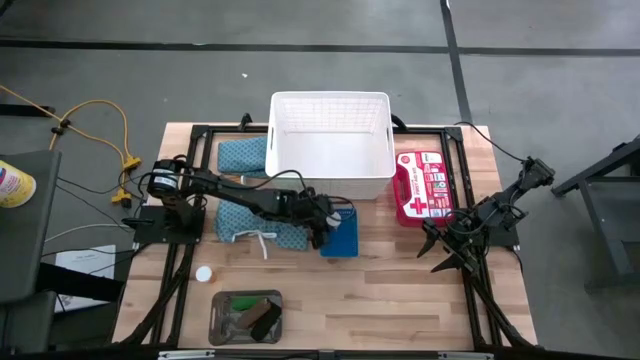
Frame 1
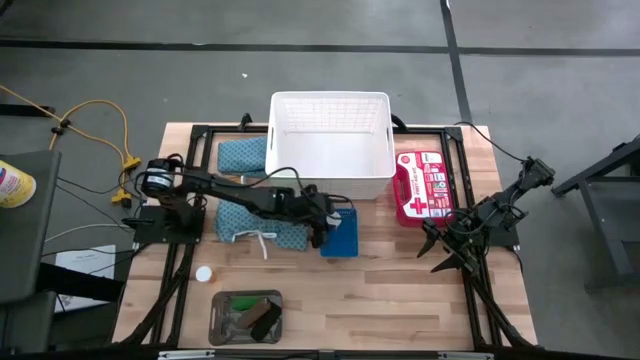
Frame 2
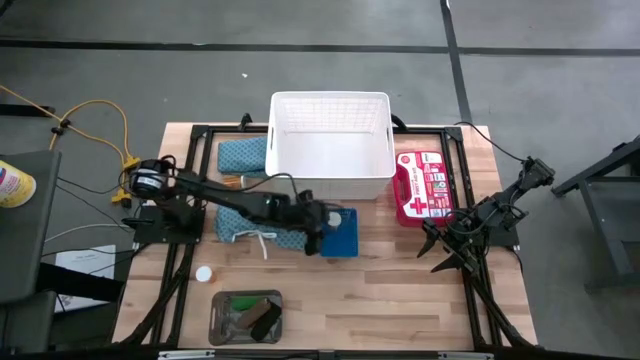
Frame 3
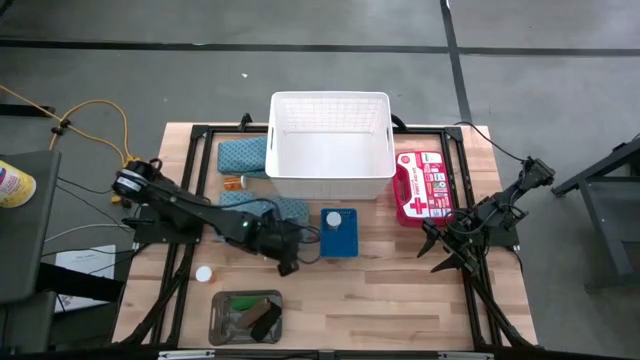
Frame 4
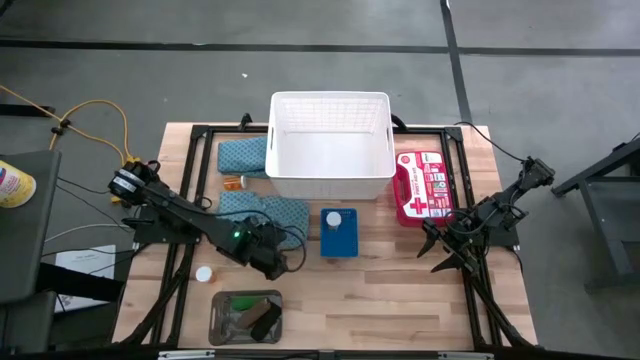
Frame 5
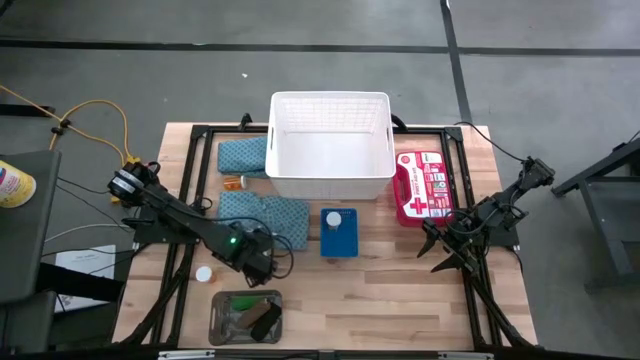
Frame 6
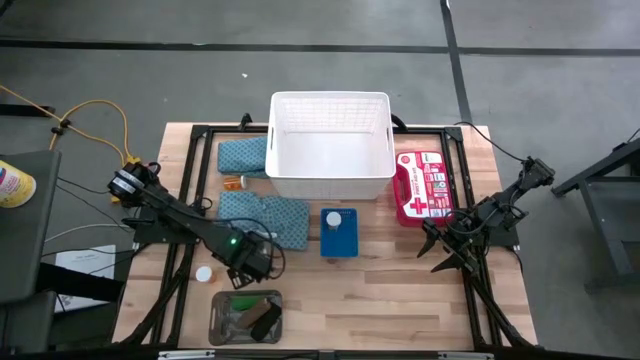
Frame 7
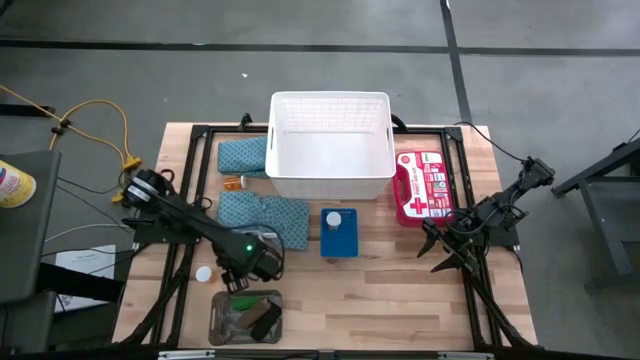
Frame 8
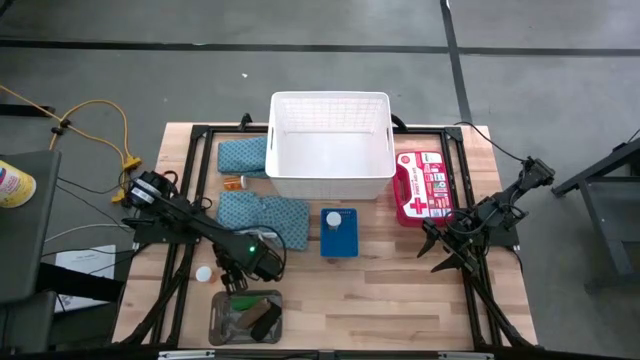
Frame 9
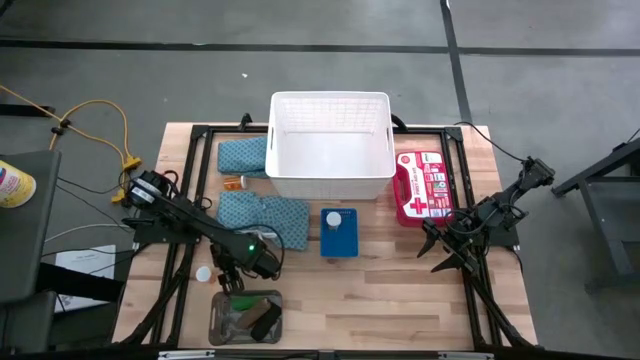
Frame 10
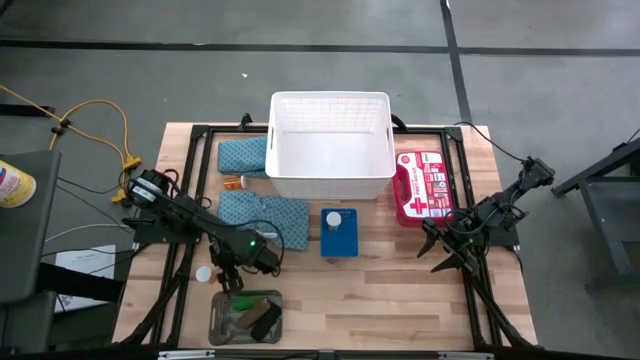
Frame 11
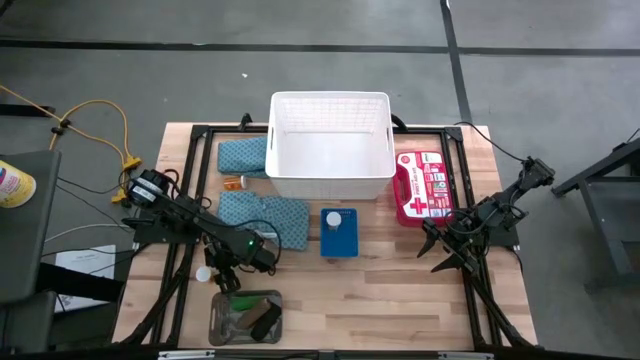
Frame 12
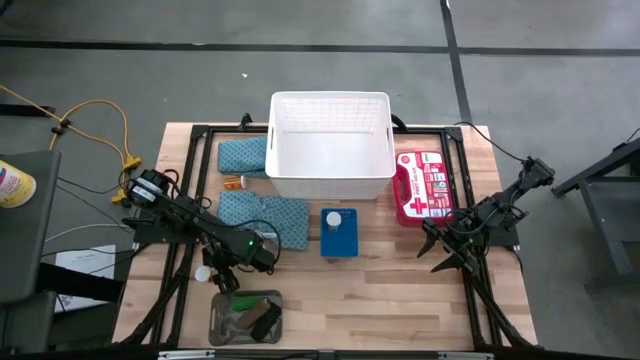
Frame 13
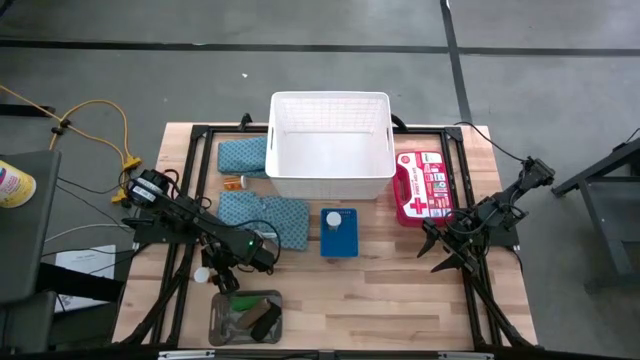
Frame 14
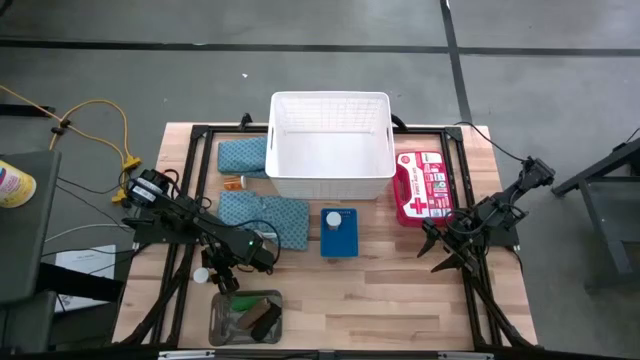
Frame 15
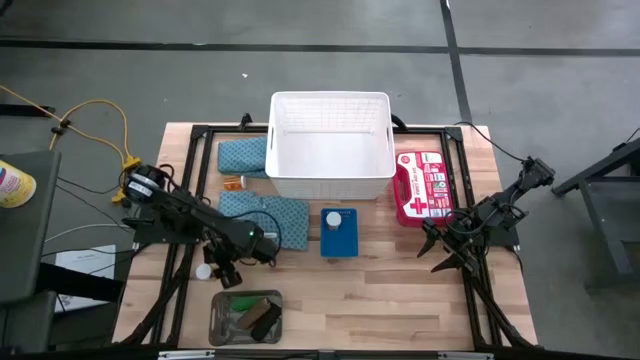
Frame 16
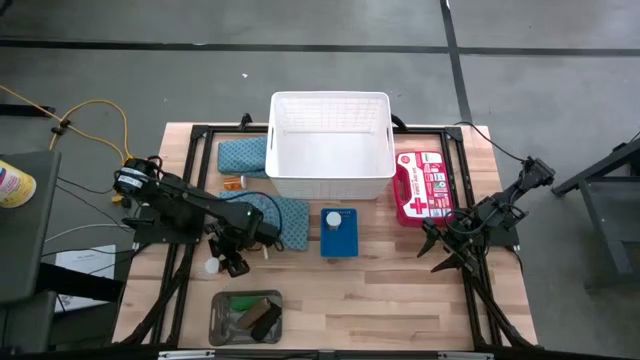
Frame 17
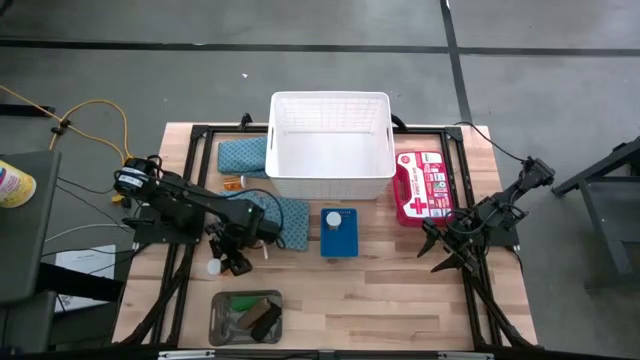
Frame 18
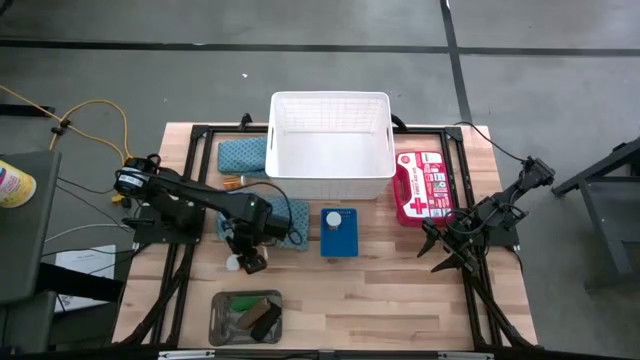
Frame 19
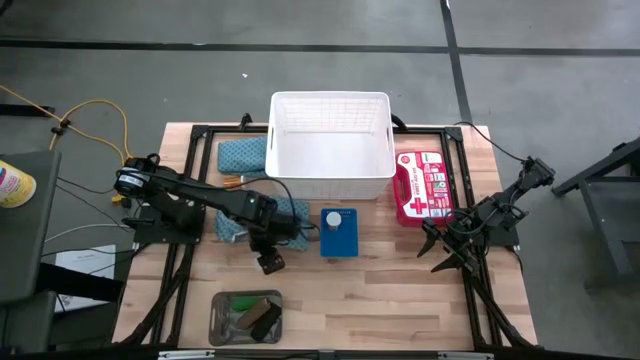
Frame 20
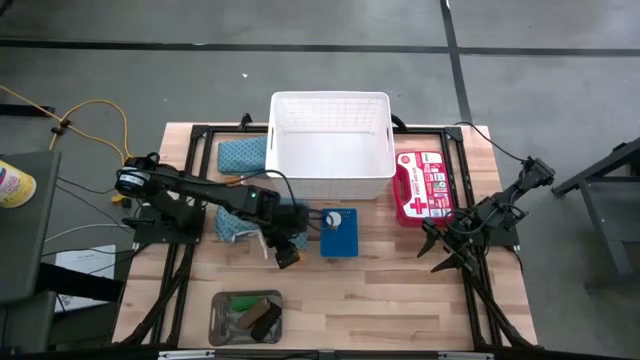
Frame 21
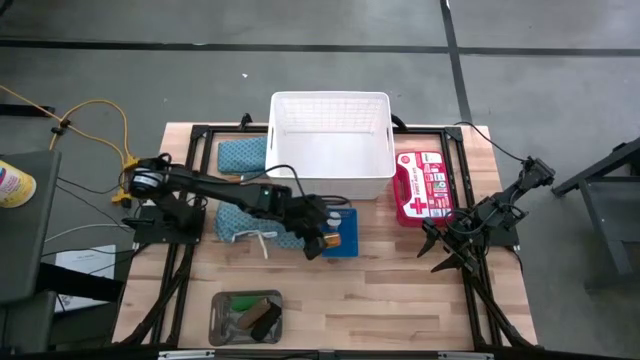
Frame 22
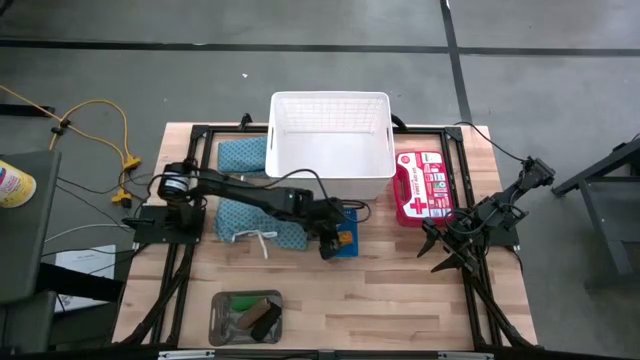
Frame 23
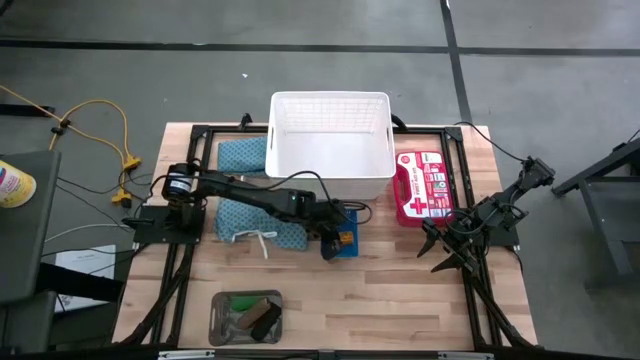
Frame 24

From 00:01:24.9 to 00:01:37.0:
Task: Pick & place medical supplies in basket/bin
Put the bottom orange pill bottle into the blue bin

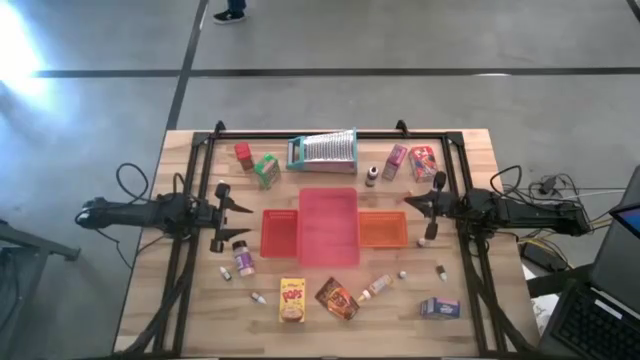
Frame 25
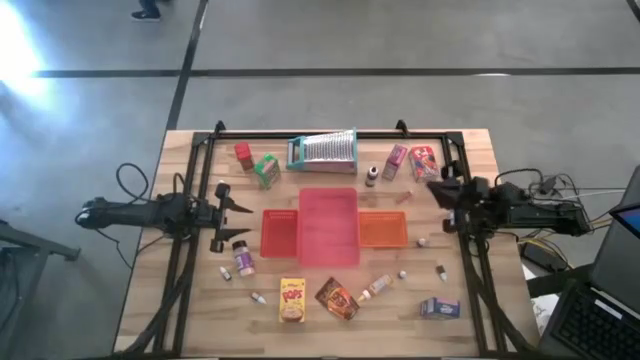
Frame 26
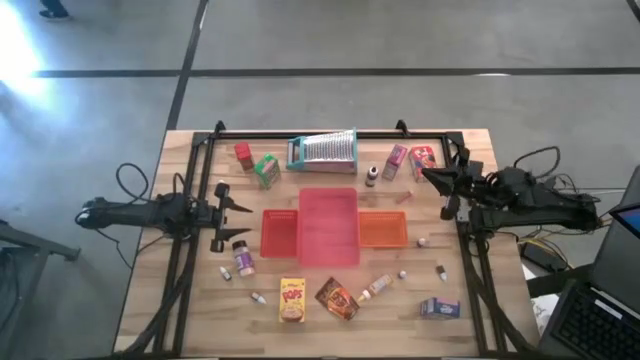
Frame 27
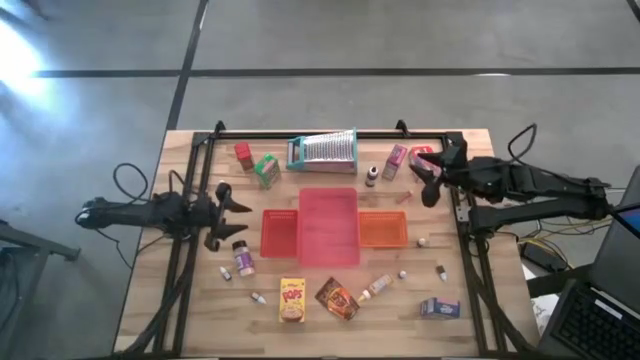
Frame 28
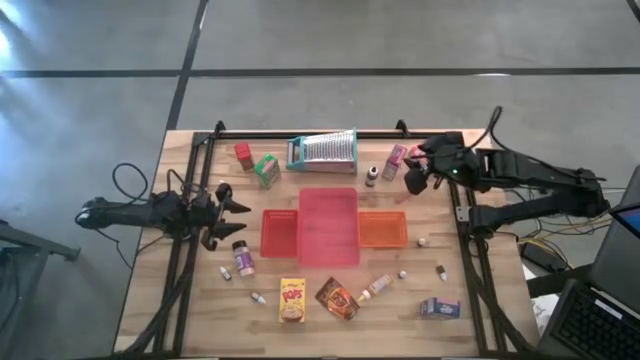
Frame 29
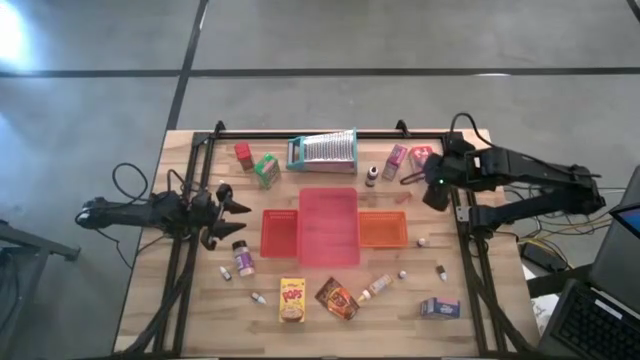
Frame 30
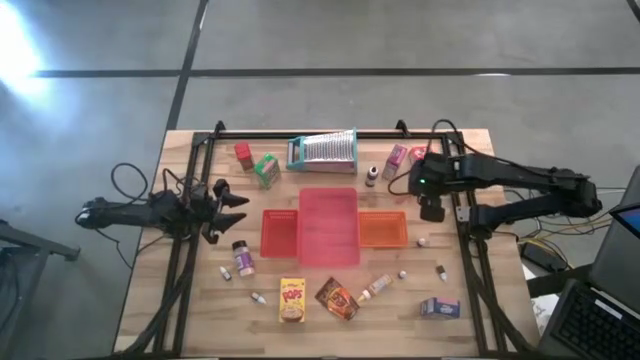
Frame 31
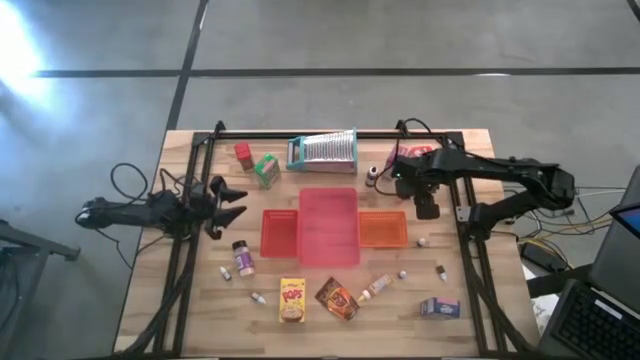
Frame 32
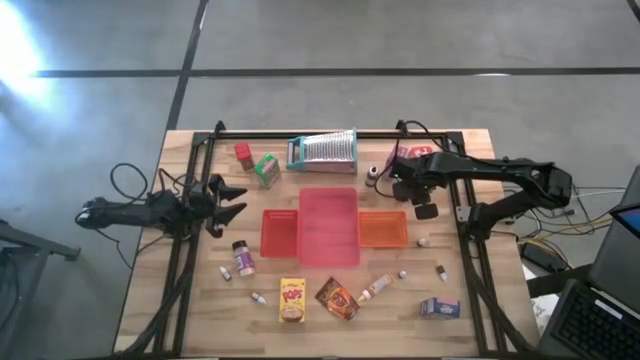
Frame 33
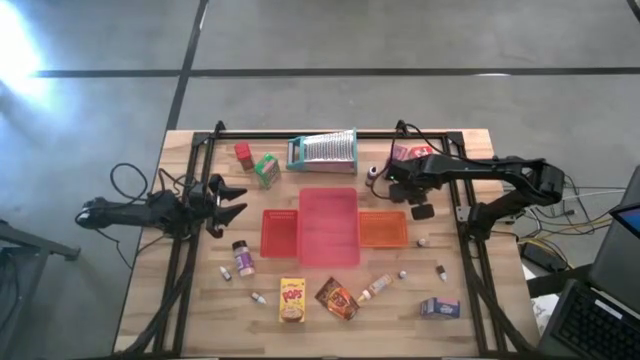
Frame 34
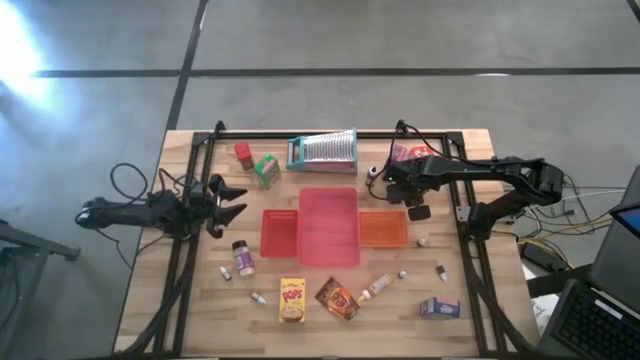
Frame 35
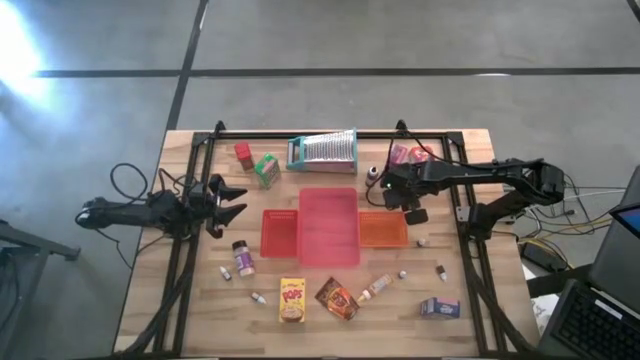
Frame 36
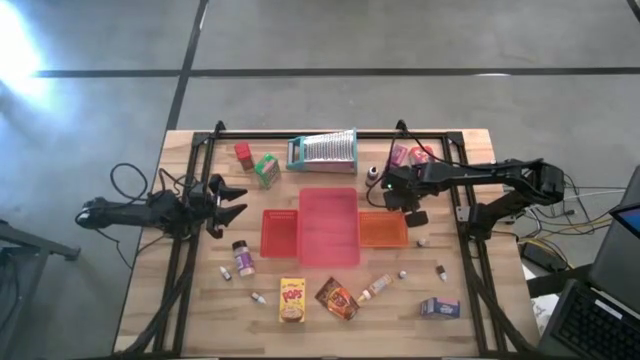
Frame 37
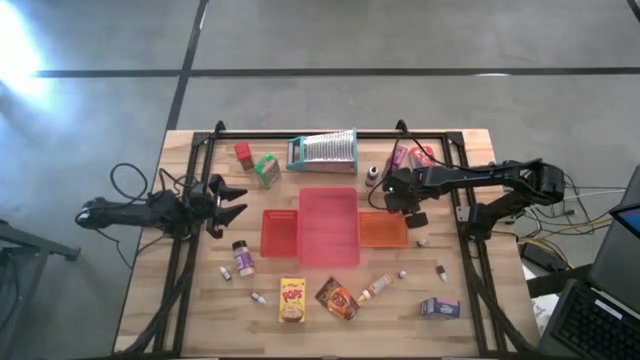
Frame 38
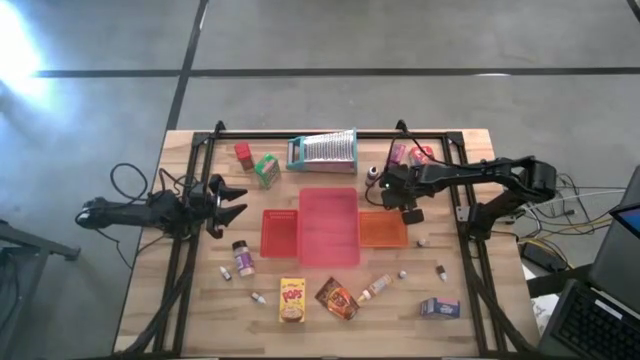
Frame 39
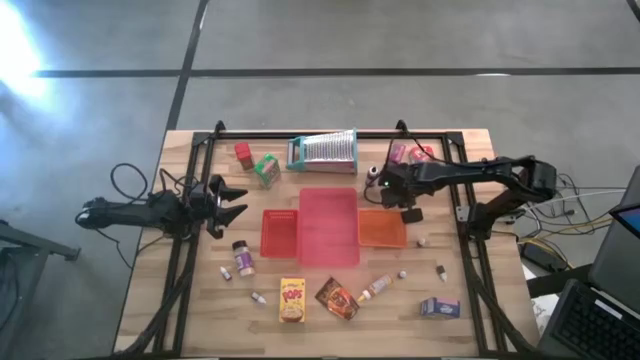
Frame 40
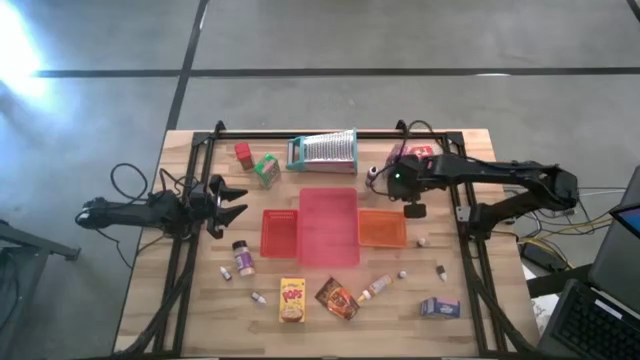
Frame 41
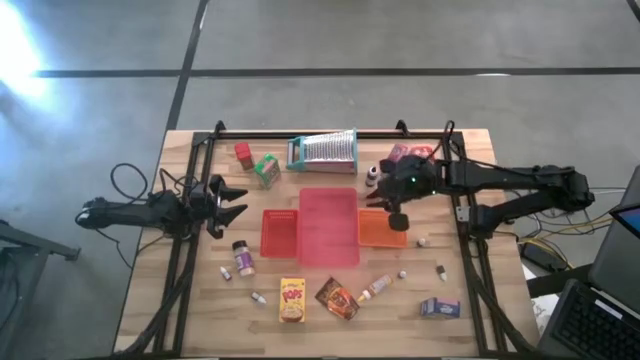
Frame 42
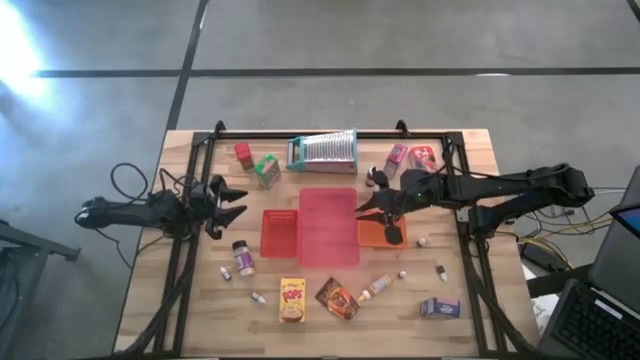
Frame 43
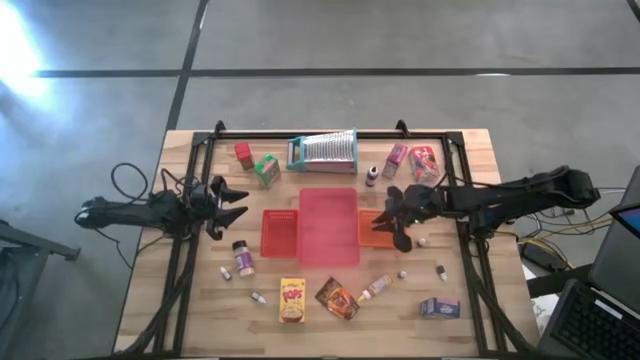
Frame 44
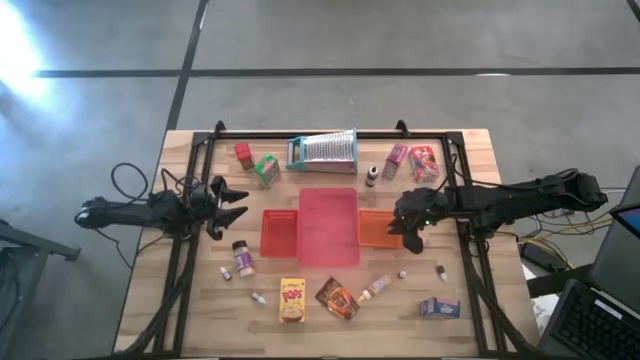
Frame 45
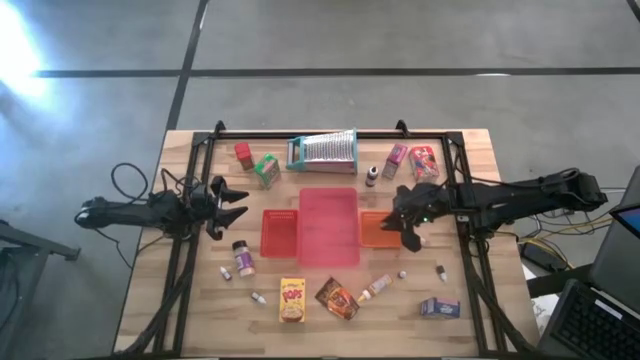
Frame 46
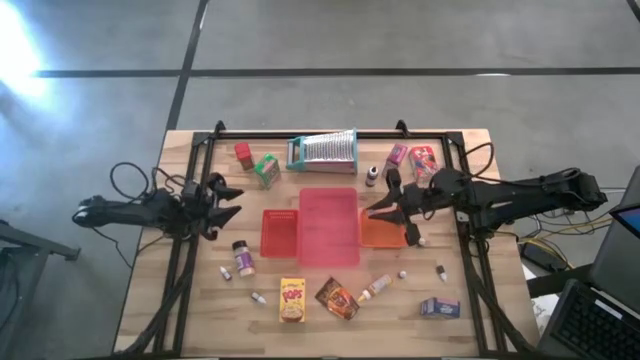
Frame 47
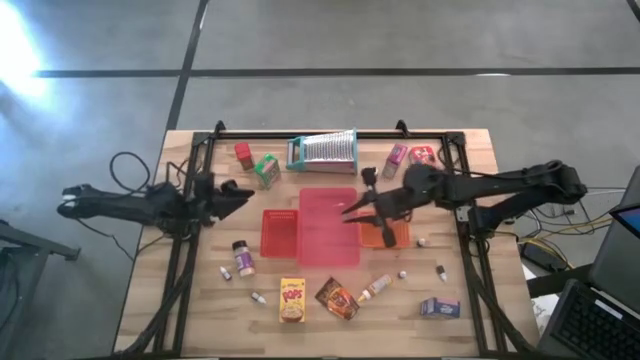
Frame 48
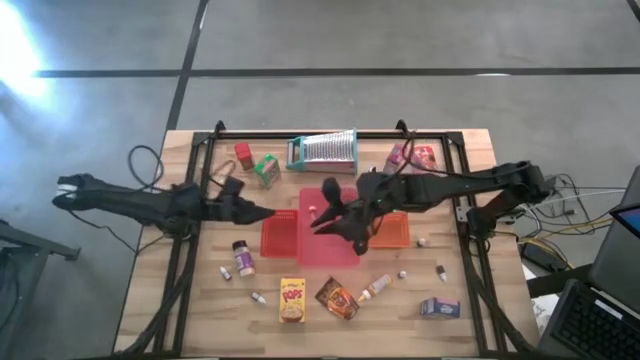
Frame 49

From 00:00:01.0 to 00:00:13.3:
Task: Pick & Place Kitchen Items
Put the small orange food coloring bottle into the orange bin
